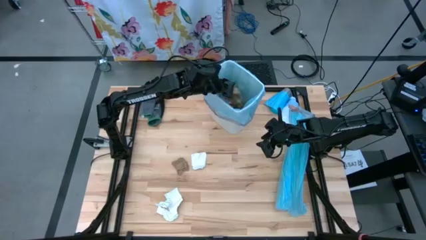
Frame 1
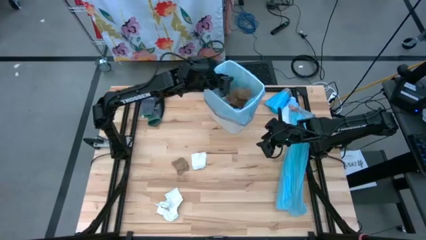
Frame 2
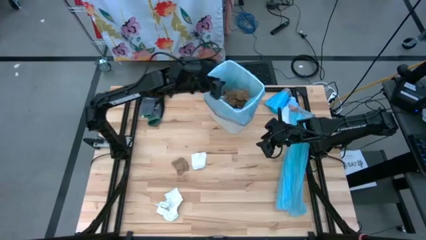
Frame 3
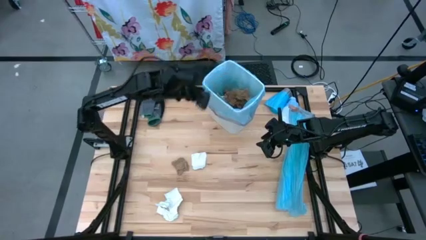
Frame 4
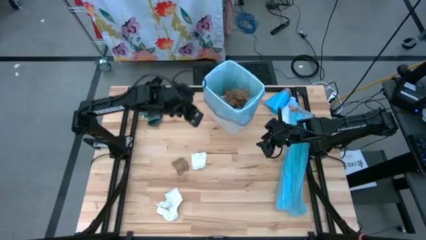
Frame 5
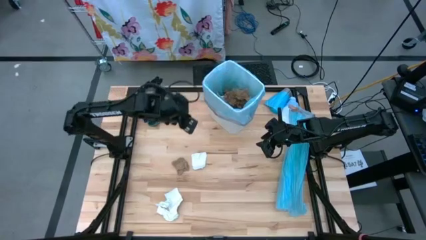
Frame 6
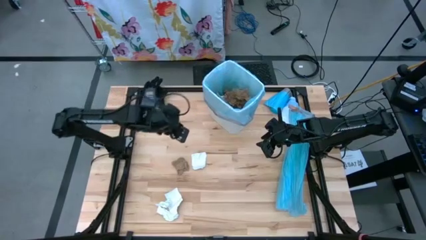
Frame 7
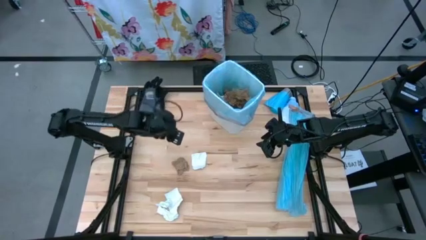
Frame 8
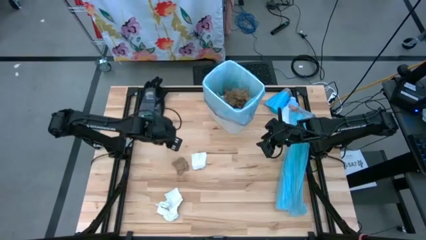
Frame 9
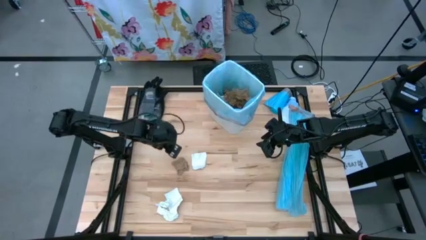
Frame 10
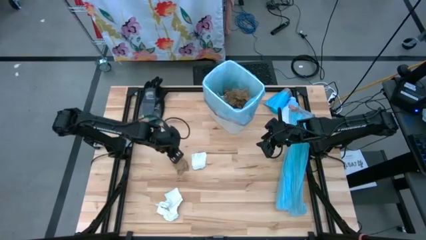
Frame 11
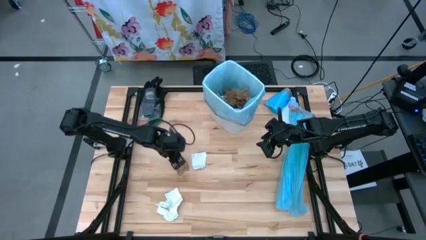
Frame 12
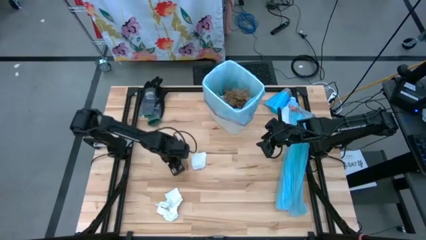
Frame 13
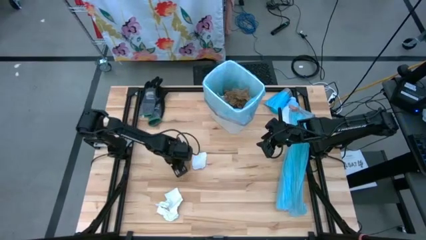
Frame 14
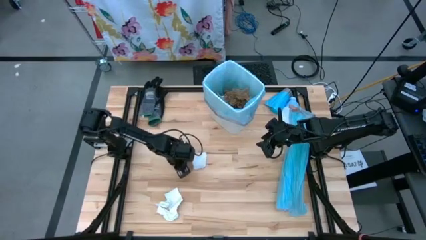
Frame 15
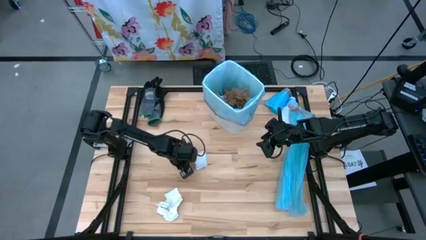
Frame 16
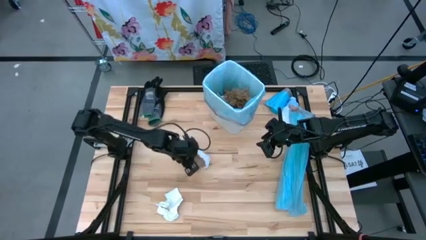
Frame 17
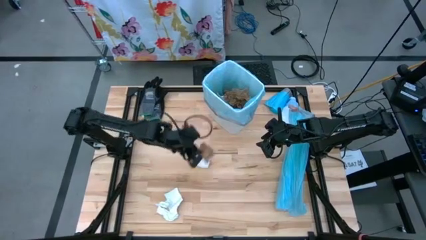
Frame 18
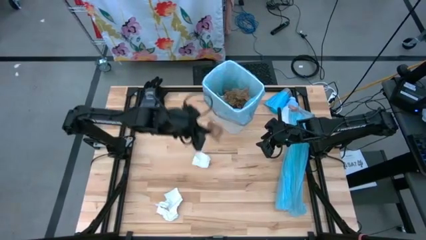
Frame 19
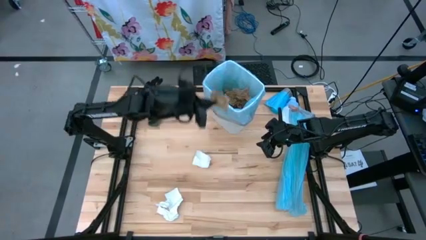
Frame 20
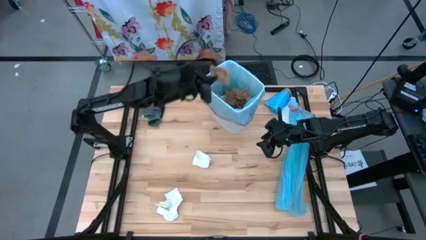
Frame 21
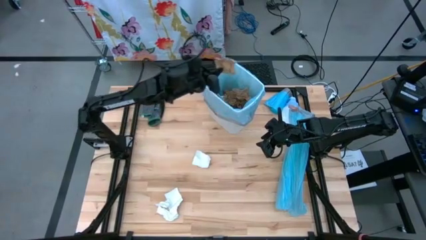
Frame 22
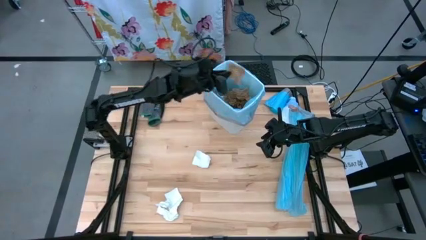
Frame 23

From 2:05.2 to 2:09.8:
Task: place trash/remove bag and relplace
Put the brown napkin into the trash bin

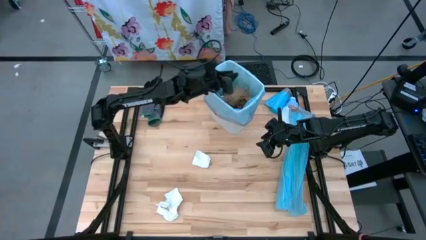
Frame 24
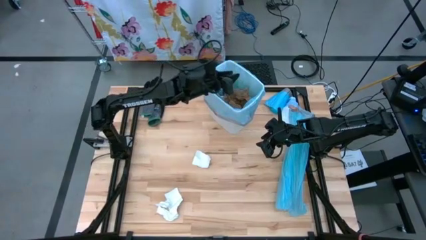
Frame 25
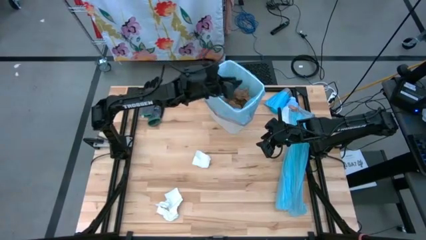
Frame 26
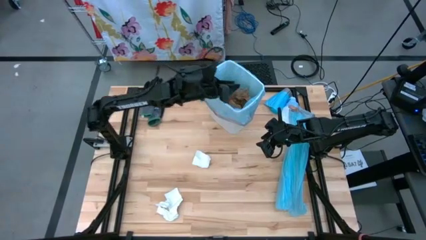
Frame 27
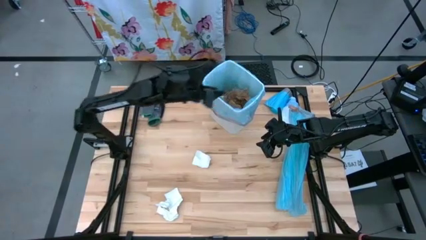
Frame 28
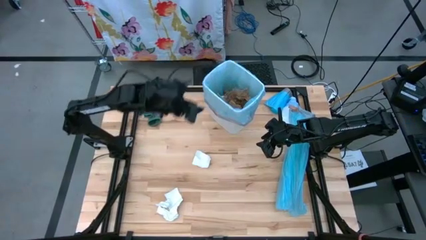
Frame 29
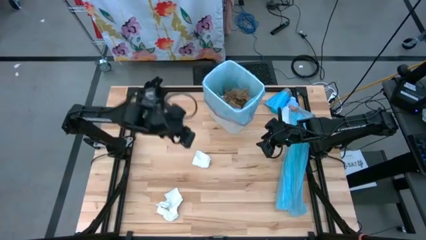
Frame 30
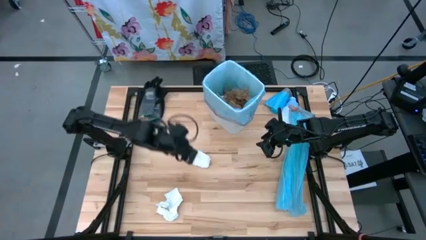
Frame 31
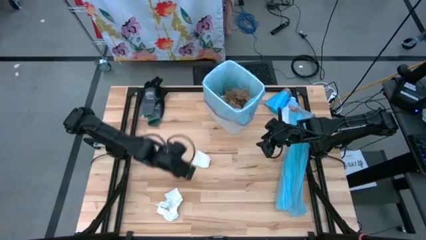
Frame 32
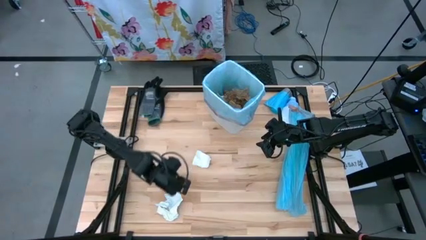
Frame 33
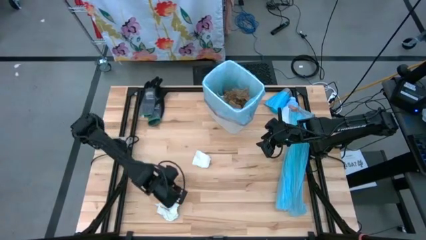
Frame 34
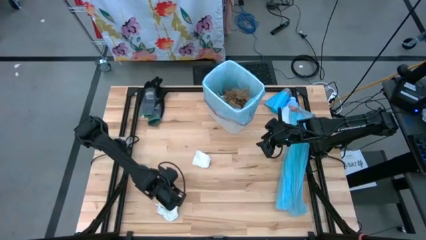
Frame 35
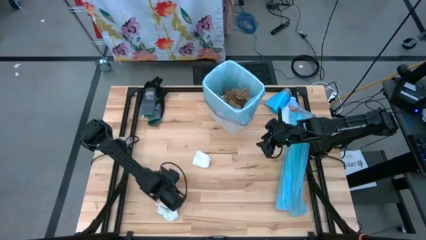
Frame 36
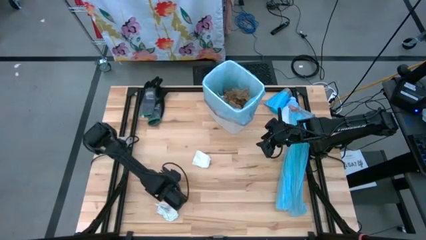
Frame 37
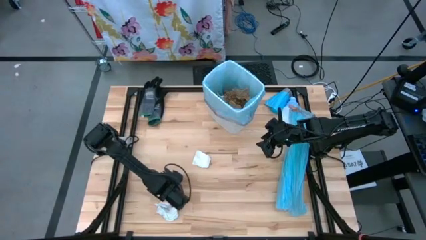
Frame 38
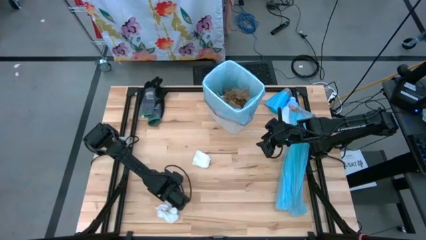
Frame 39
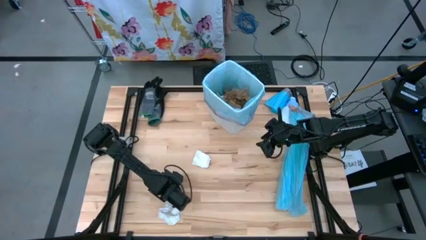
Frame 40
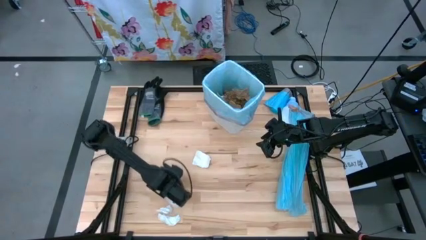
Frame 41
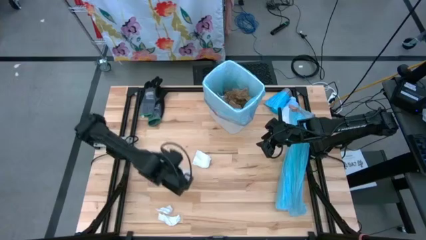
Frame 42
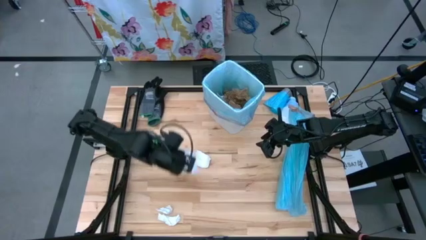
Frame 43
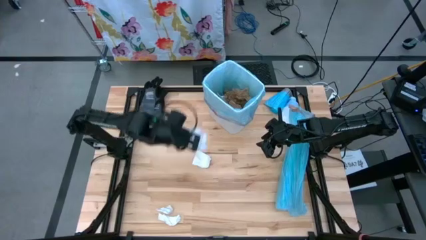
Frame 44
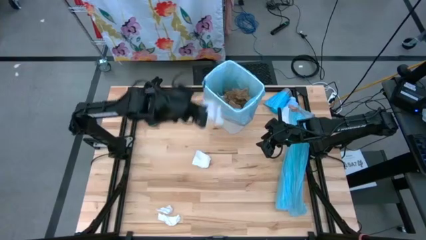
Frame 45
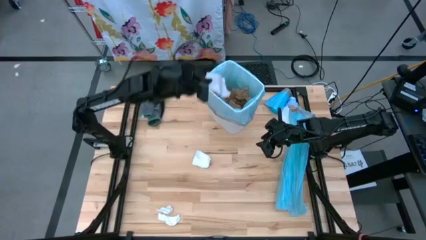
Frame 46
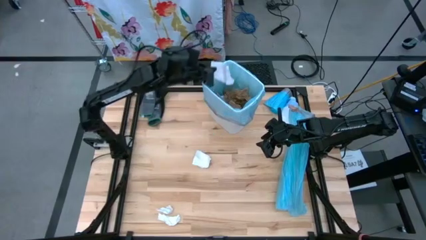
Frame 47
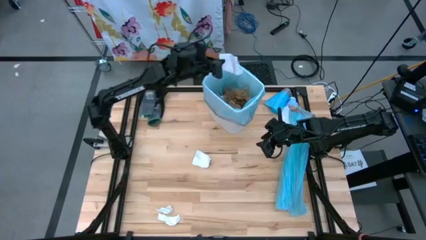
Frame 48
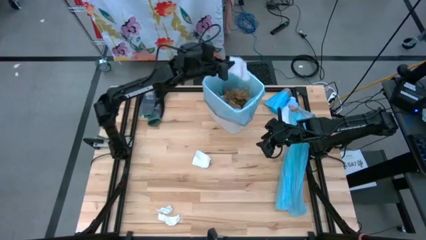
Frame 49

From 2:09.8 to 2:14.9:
Put the white paper into the trash bin

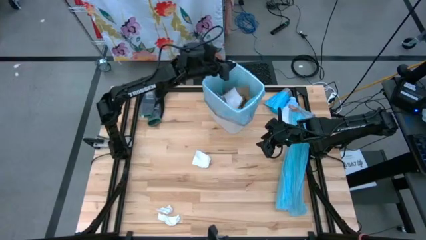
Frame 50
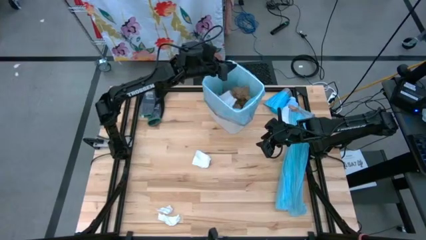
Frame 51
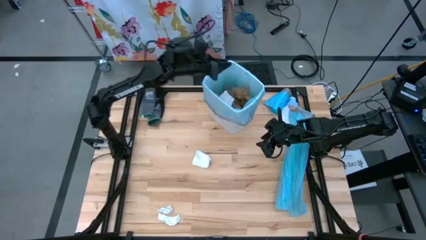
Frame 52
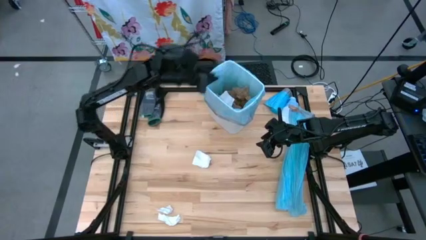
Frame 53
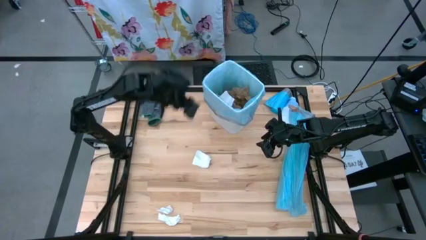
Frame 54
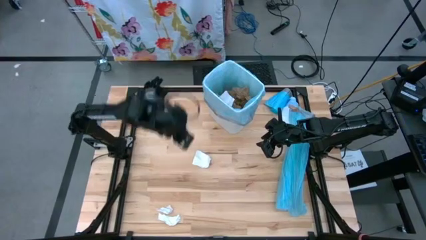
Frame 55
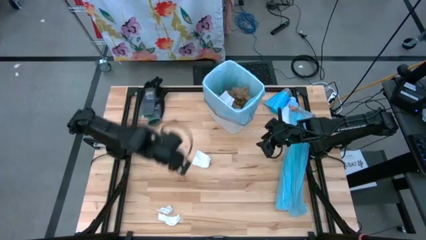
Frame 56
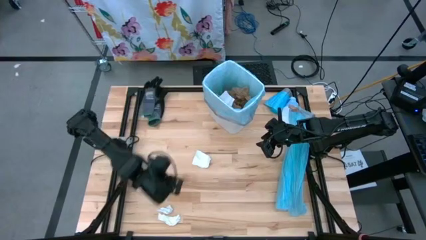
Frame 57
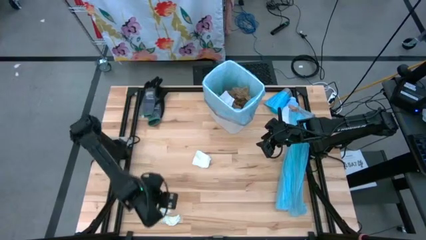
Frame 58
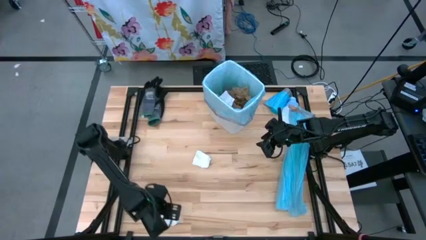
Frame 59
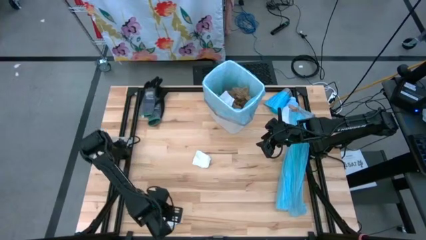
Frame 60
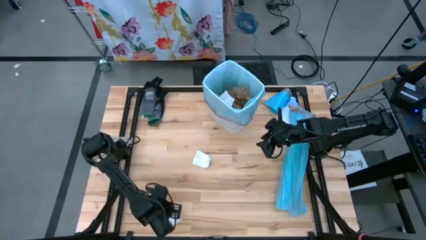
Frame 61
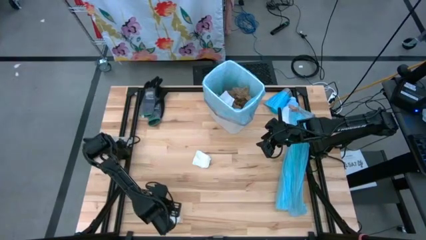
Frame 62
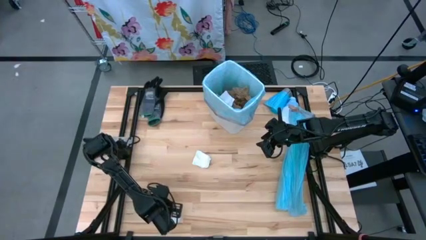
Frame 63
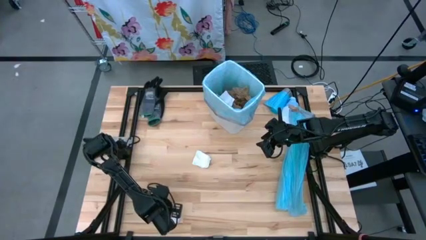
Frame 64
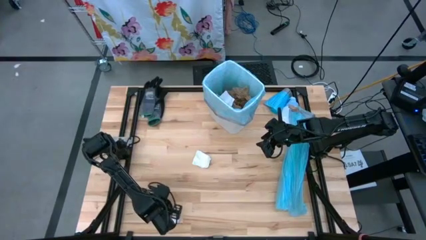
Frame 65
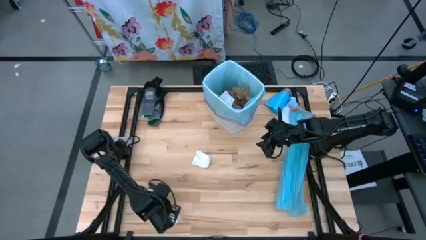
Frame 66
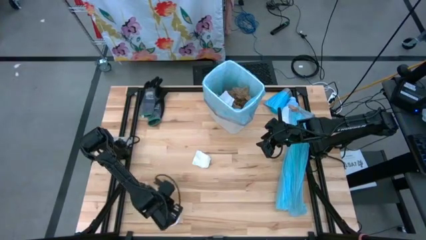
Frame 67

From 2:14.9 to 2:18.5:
Put the white paper into the trash bin

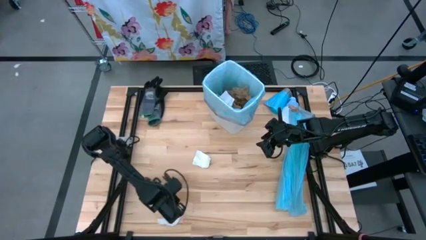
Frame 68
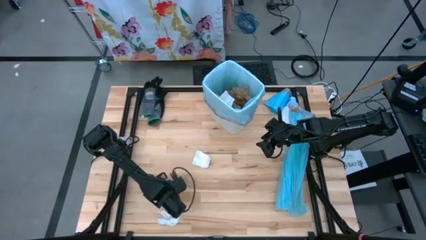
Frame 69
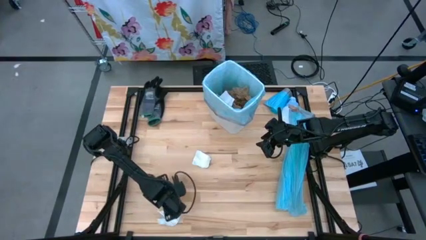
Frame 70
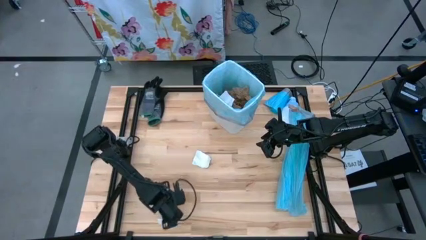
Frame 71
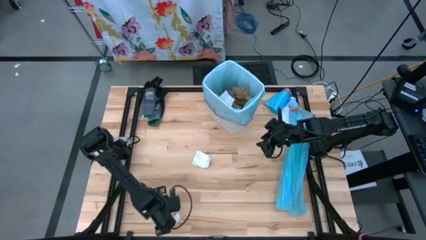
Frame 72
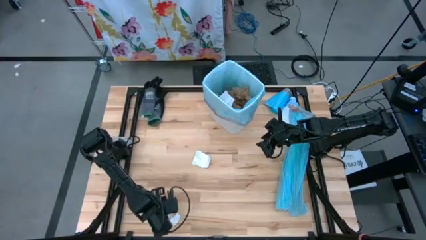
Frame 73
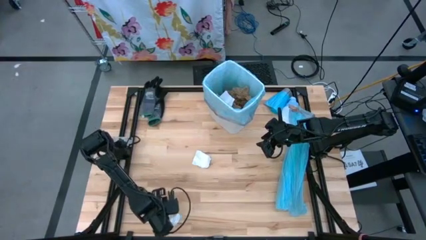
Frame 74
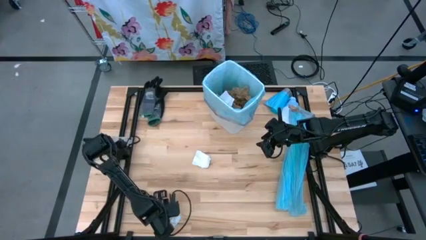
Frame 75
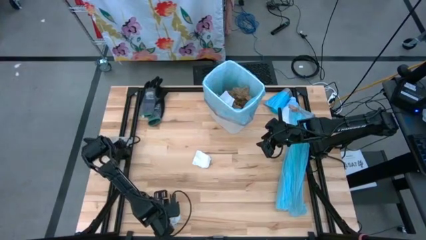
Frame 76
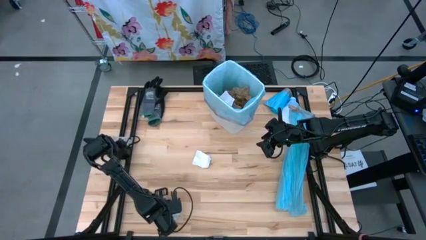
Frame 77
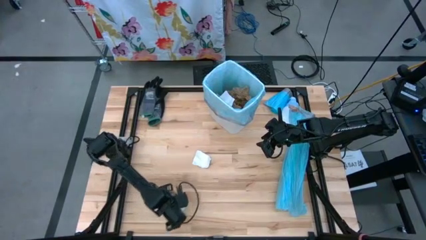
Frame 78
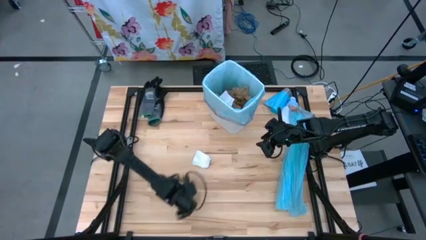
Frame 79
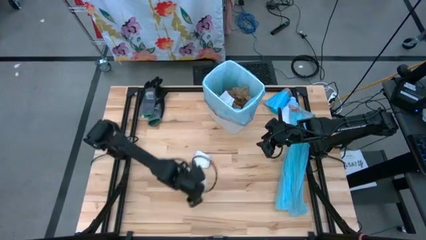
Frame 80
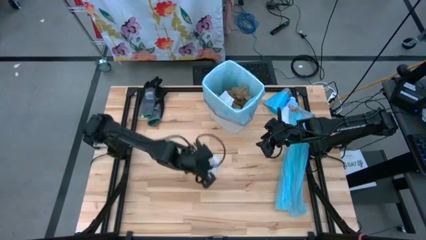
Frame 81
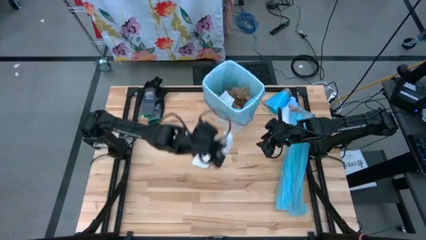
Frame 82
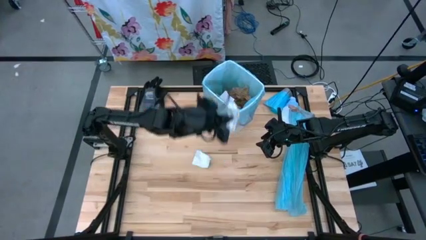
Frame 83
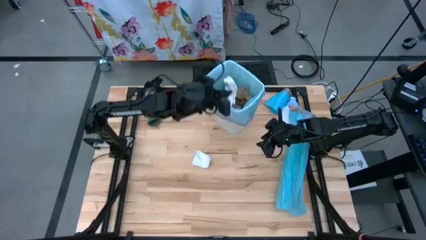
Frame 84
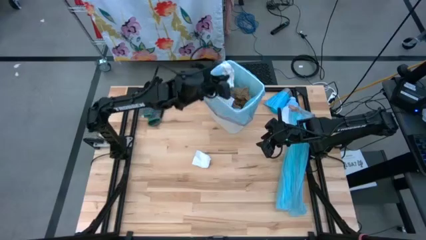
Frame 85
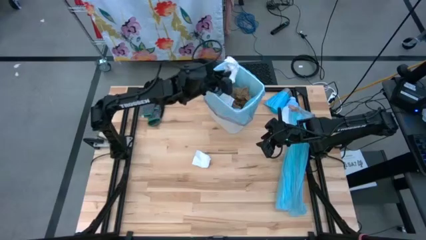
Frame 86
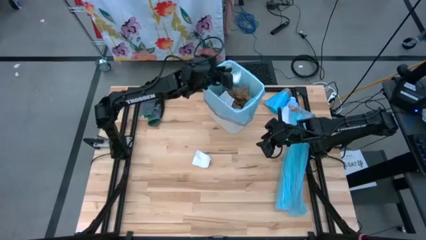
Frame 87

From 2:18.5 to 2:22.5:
Put the white paper into the trash bin
